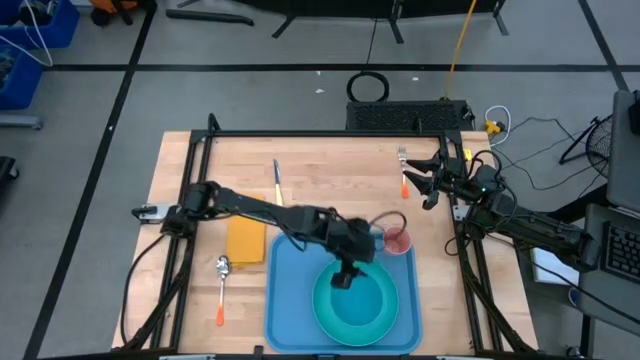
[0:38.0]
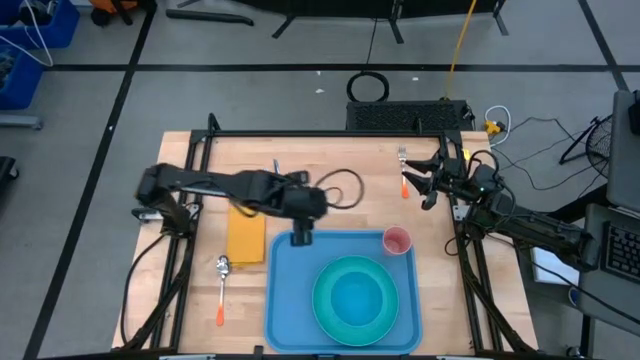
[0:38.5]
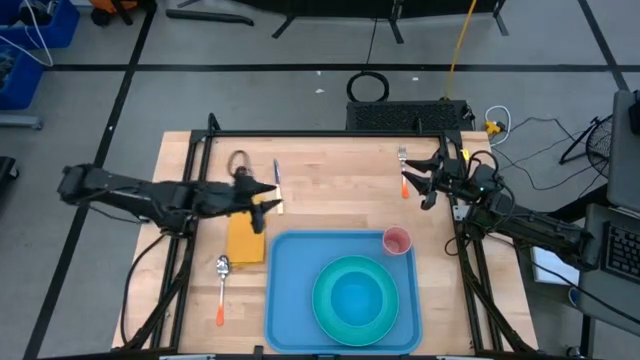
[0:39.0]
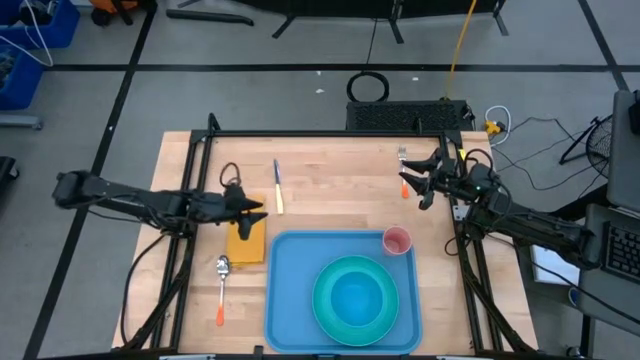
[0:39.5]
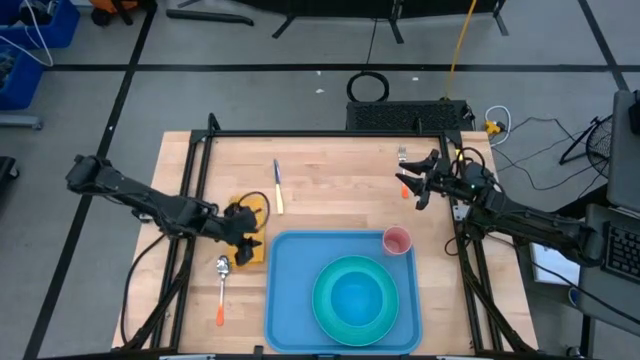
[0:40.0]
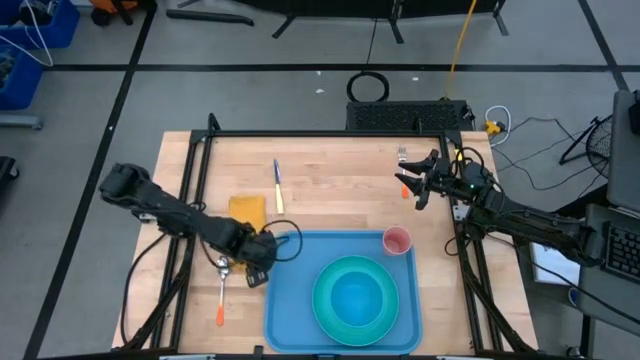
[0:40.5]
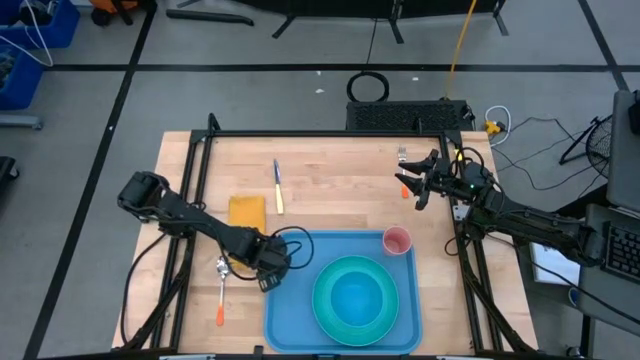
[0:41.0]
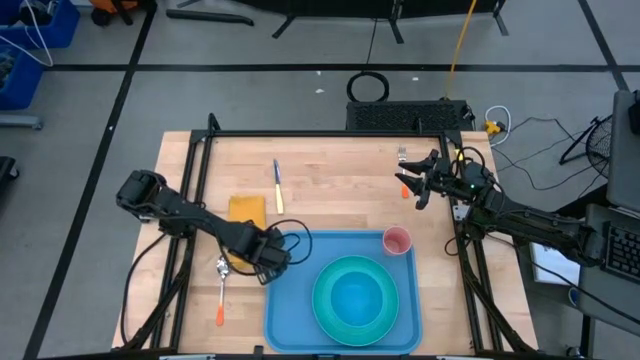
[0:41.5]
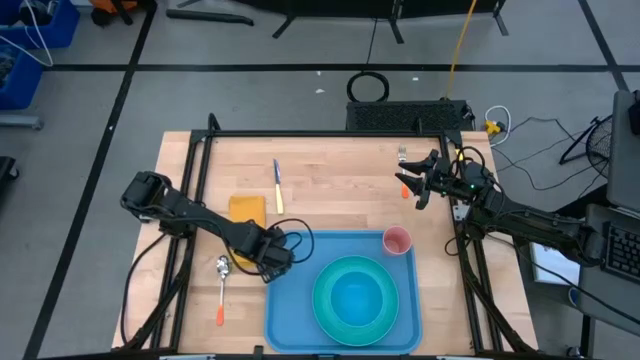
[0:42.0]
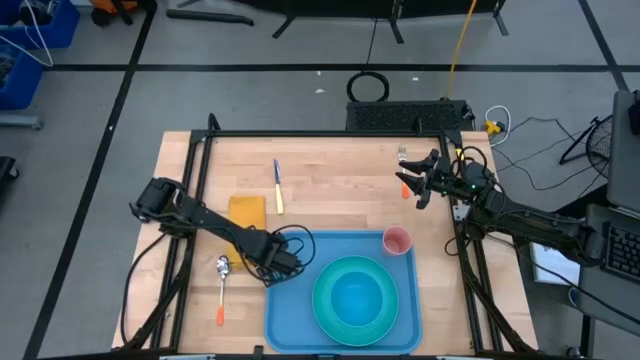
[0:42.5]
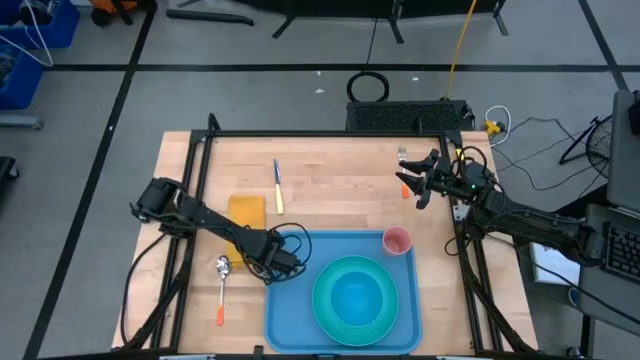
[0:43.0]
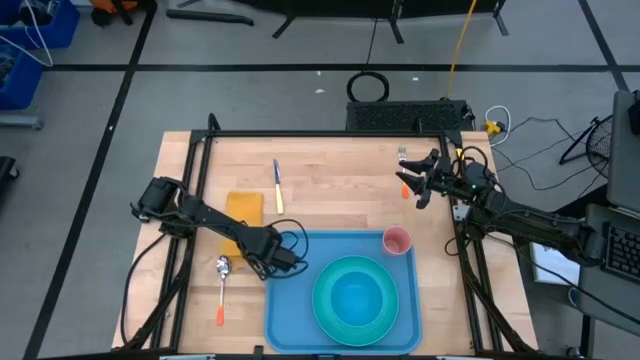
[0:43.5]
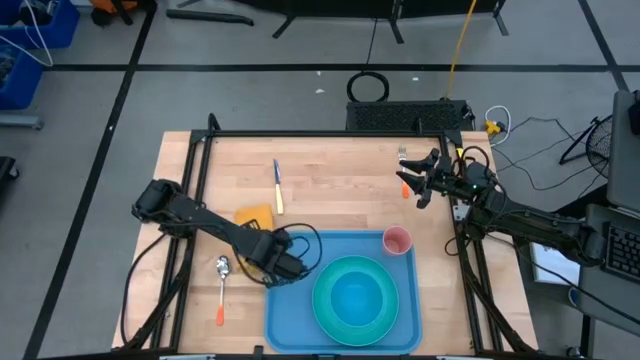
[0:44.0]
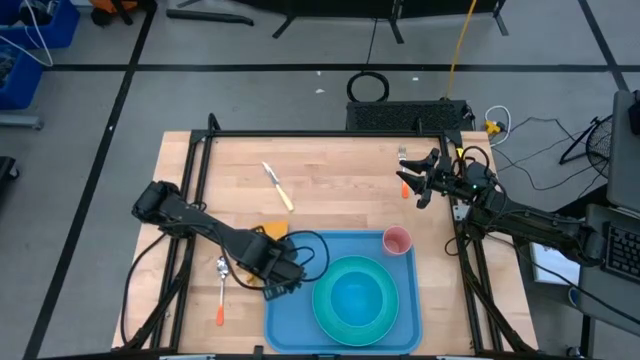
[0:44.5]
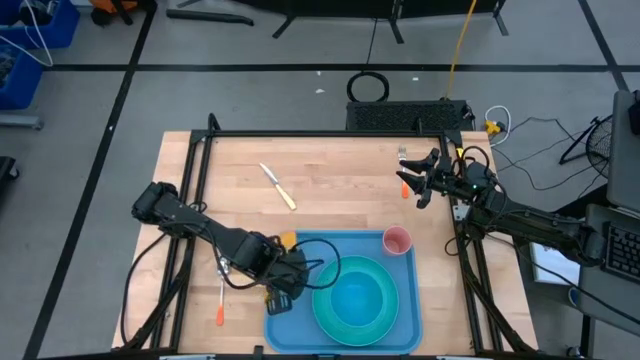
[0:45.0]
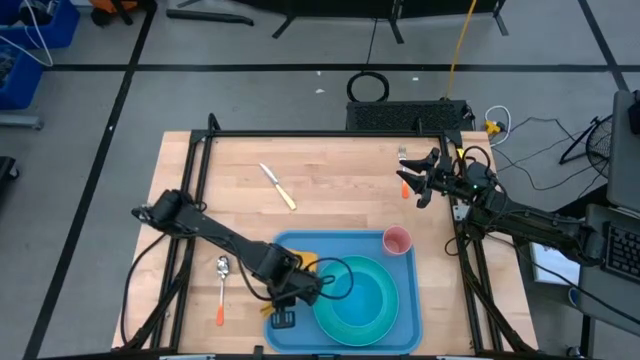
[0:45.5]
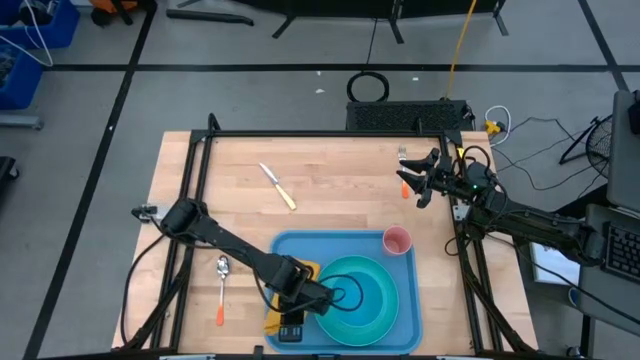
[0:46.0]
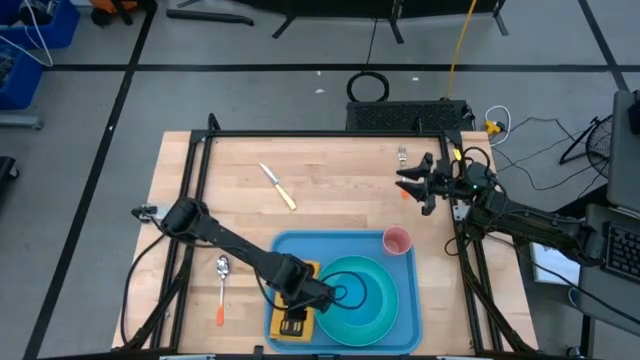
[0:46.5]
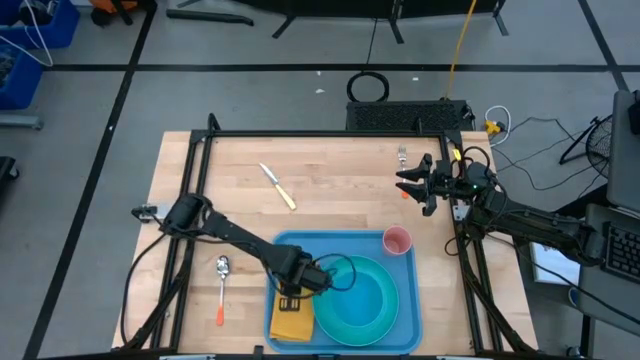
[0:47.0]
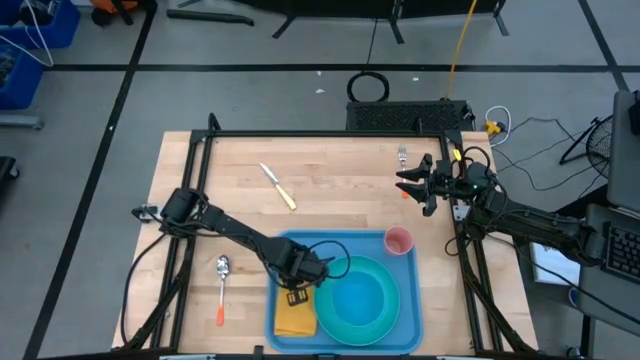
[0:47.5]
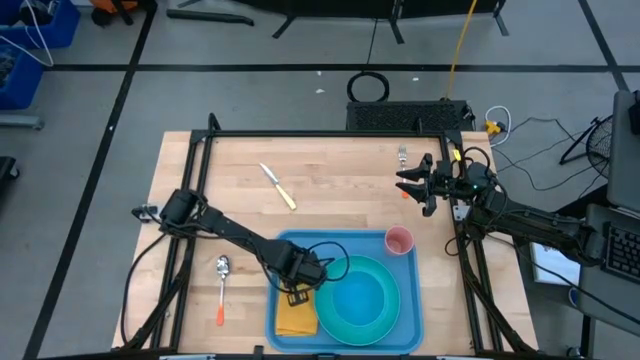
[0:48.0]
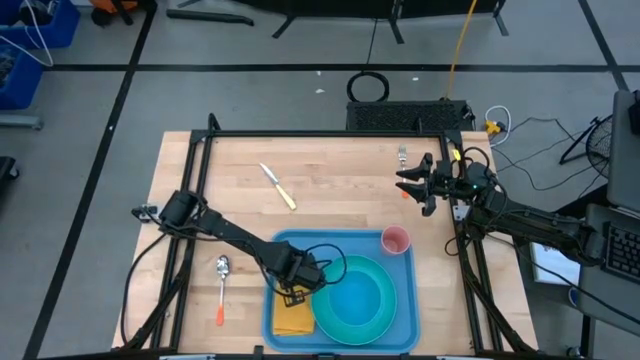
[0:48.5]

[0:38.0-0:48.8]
Task: Set up tray
Put the yellow table napkin on the left side of the blue tray

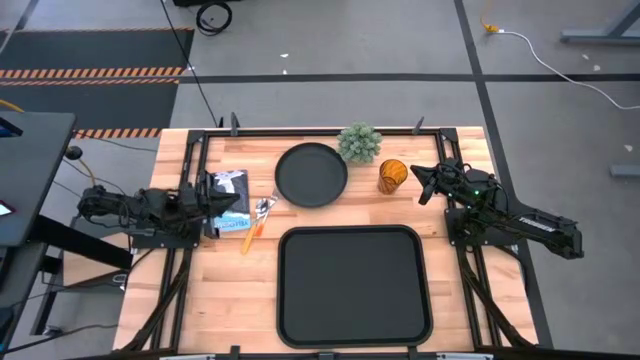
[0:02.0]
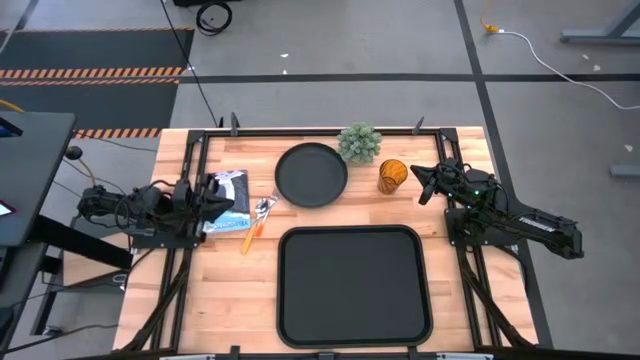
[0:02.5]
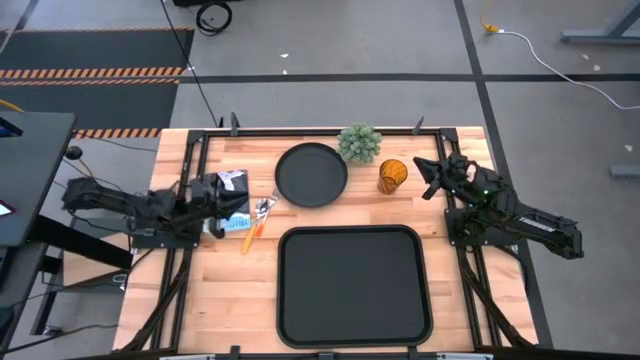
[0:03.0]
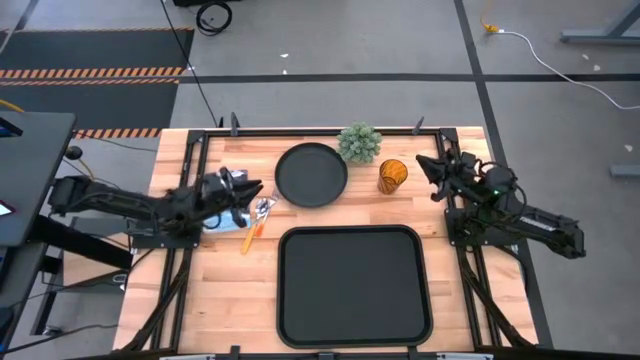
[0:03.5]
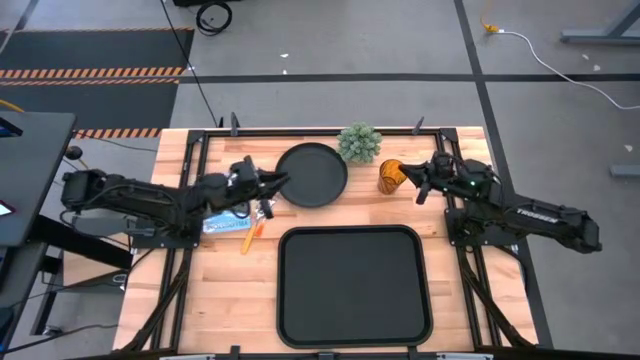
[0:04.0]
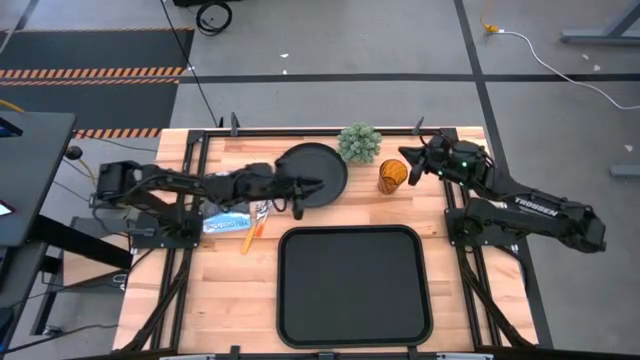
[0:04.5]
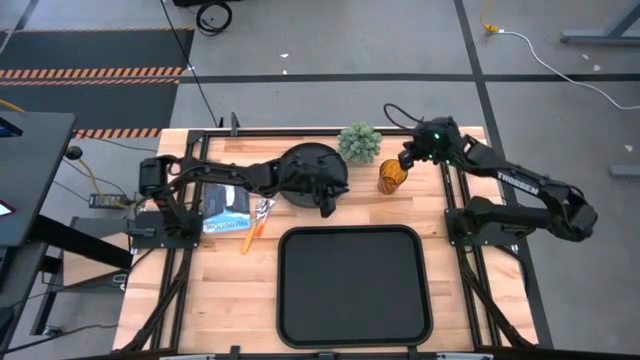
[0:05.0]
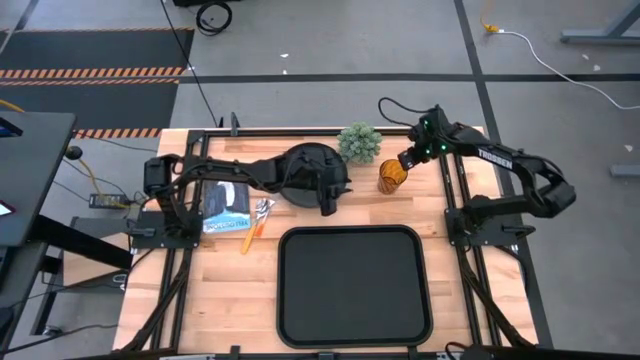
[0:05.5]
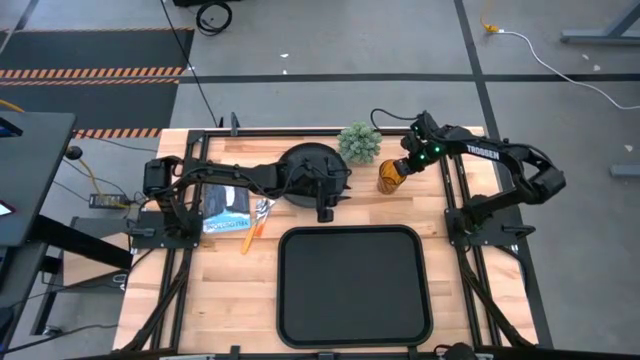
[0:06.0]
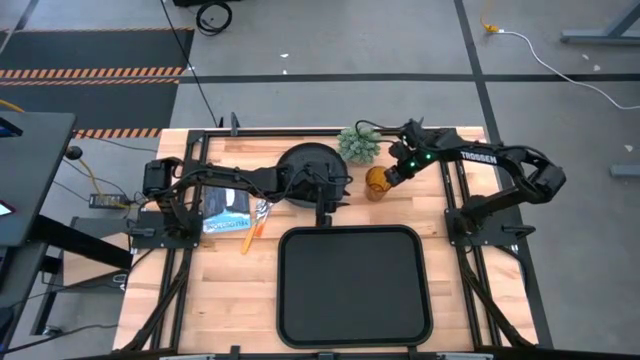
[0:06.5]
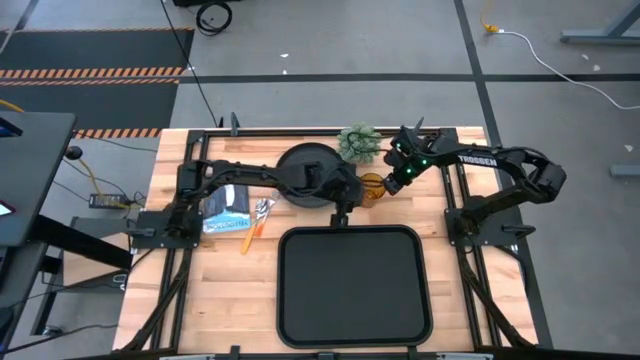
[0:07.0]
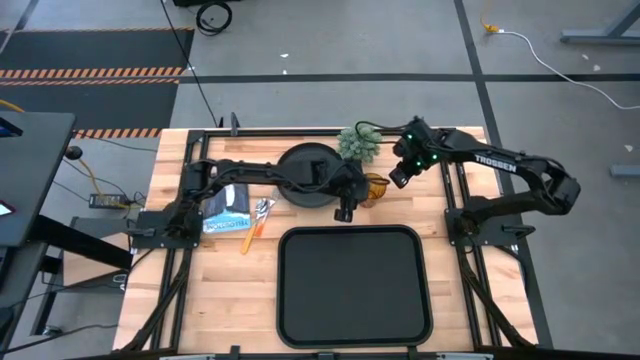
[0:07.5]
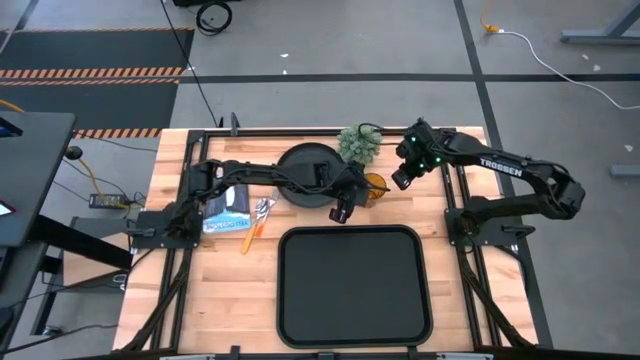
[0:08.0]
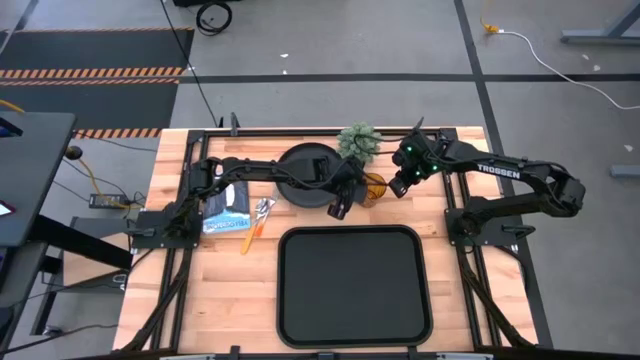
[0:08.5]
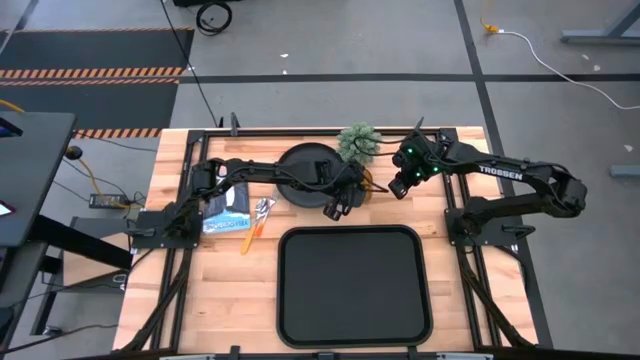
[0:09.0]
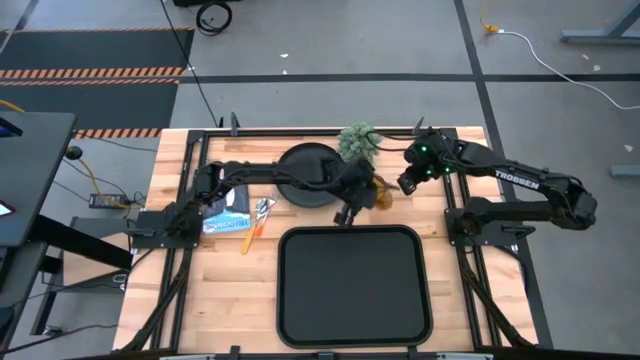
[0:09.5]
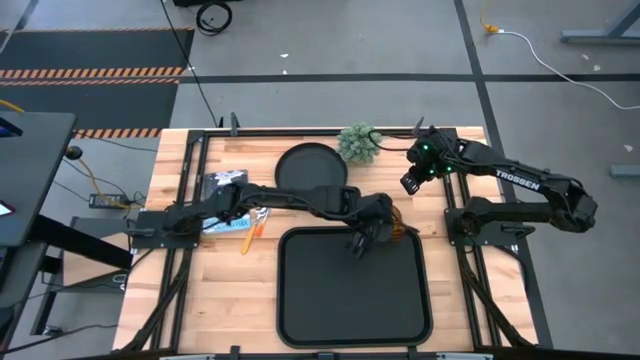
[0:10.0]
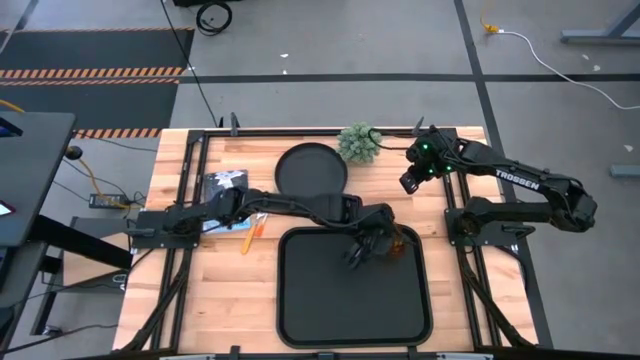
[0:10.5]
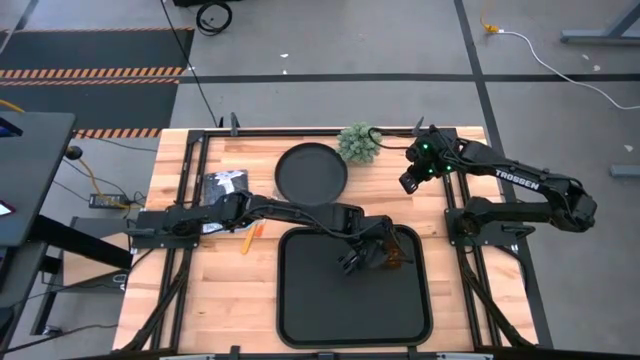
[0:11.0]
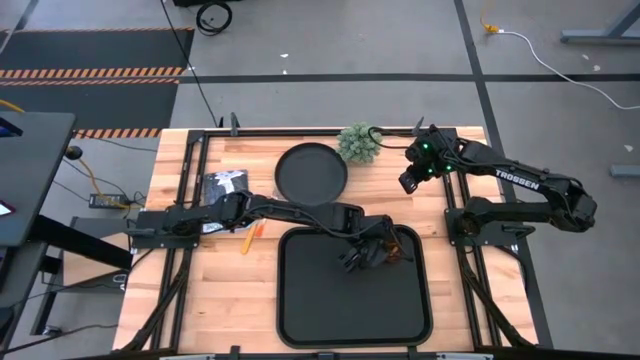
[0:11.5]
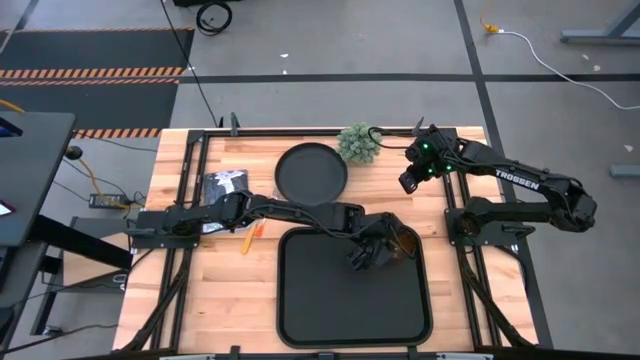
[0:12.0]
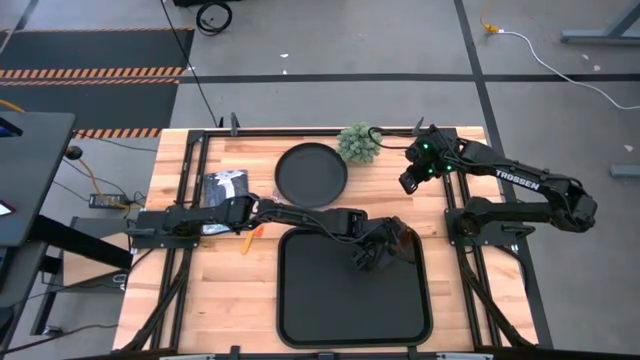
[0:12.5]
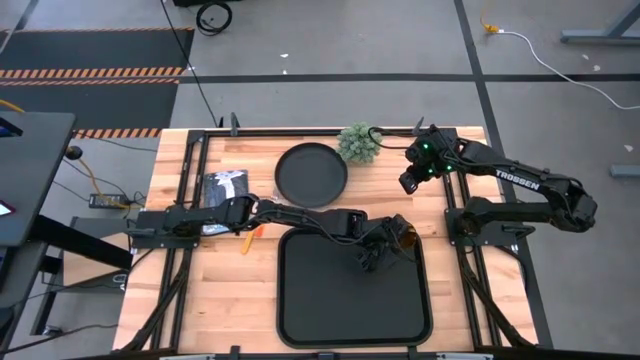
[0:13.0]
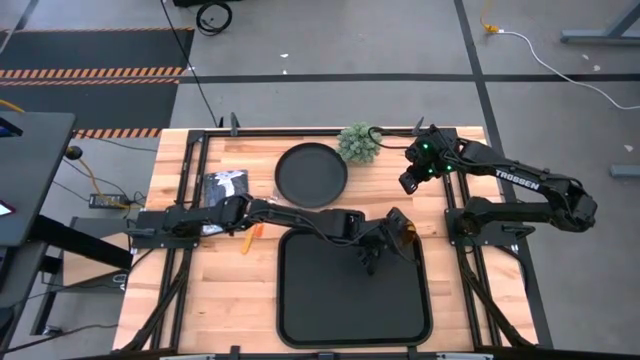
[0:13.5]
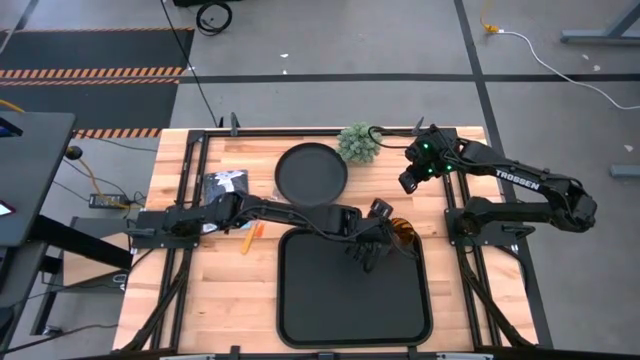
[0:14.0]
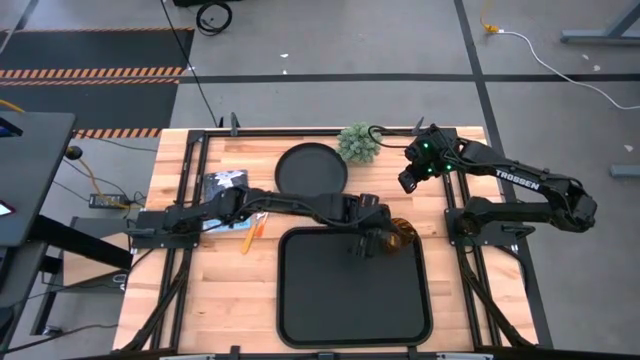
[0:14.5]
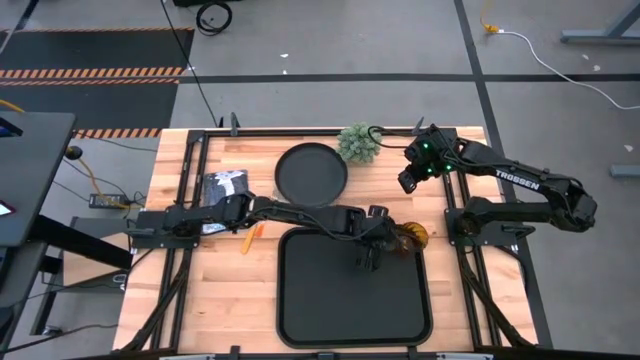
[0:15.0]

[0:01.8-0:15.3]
Task: Pick and place plate/cup/fork/spoon on tray
Put the brown cup to the top right side of the black serving tray
